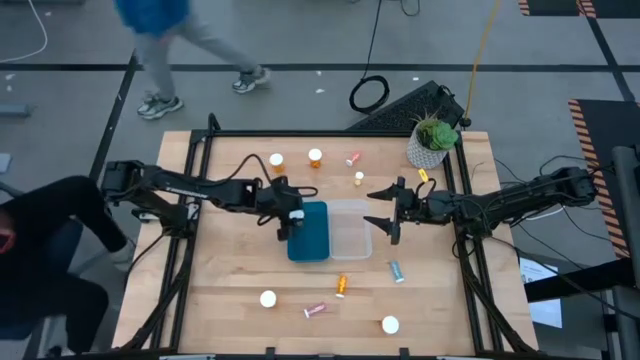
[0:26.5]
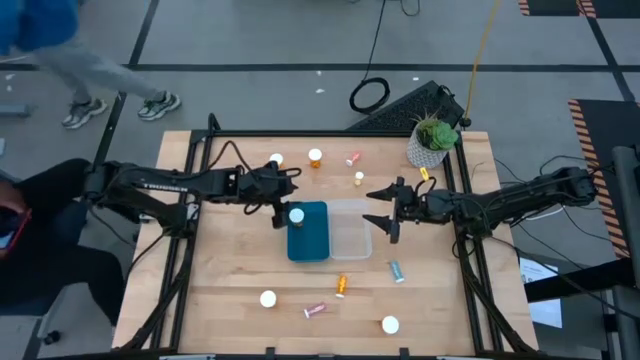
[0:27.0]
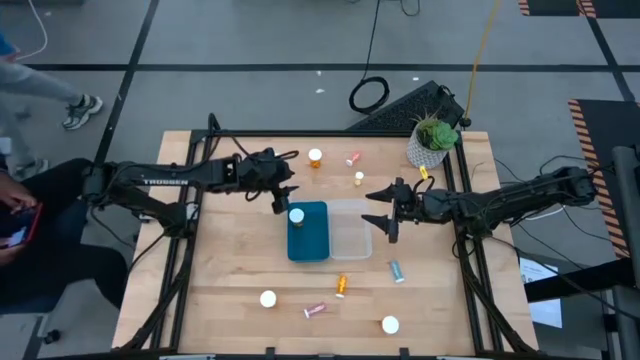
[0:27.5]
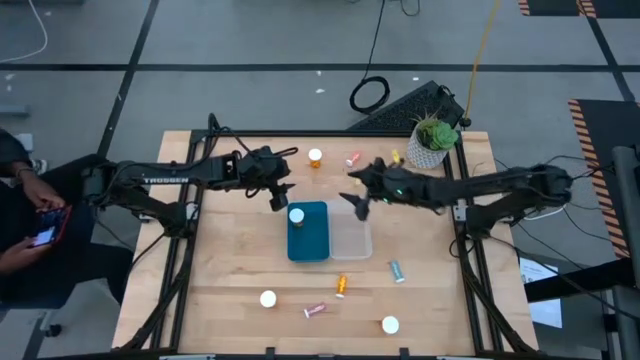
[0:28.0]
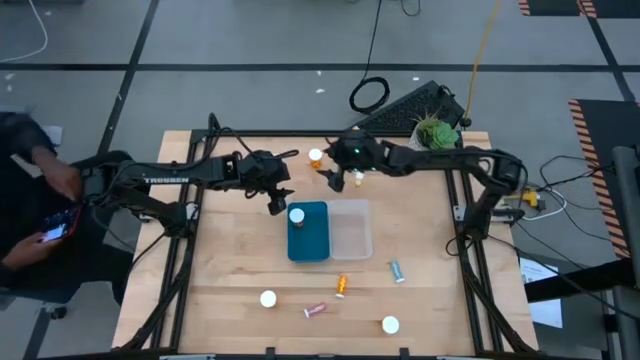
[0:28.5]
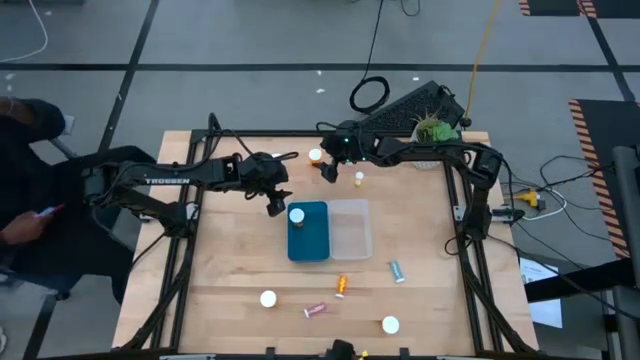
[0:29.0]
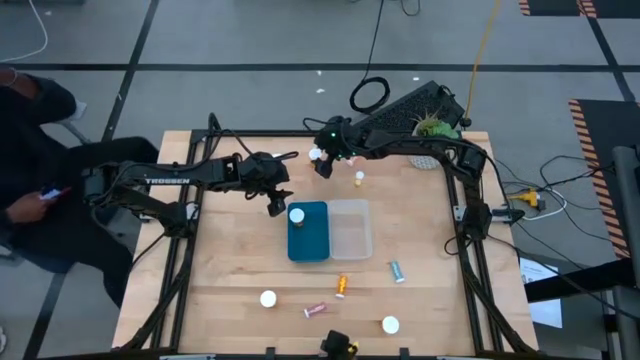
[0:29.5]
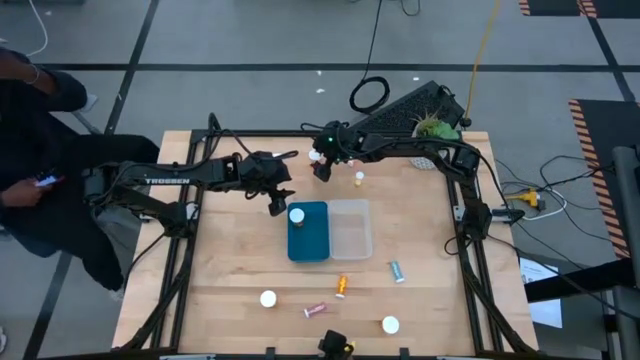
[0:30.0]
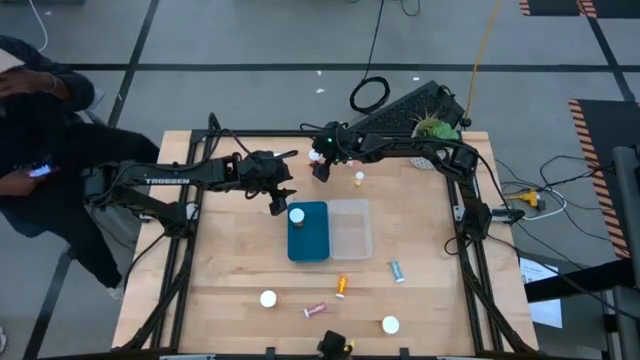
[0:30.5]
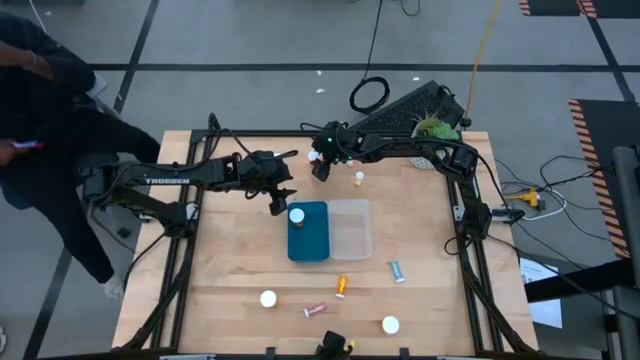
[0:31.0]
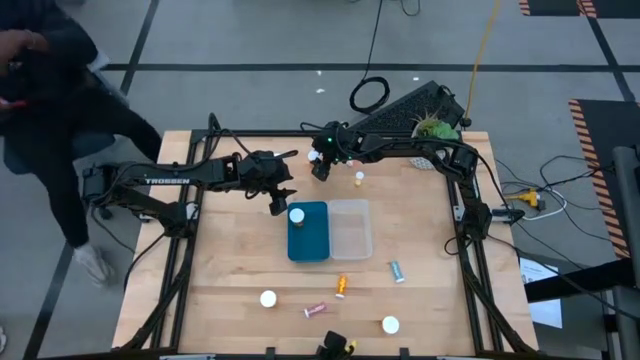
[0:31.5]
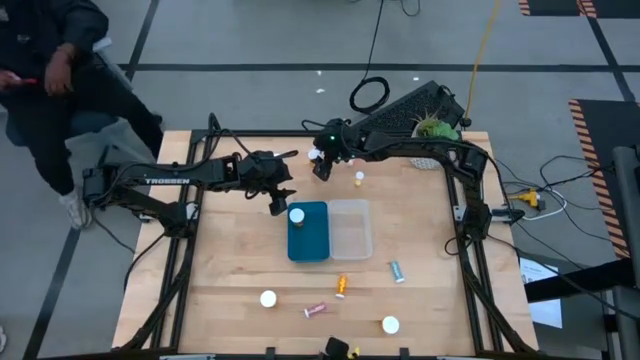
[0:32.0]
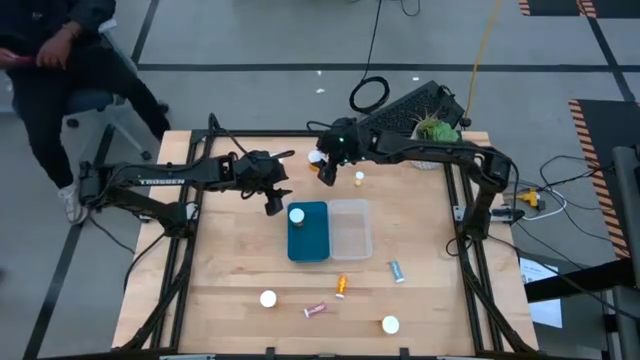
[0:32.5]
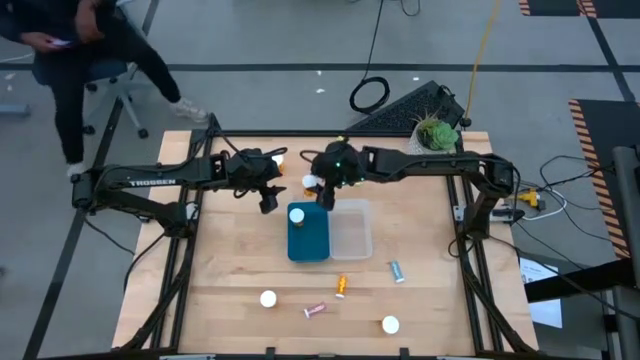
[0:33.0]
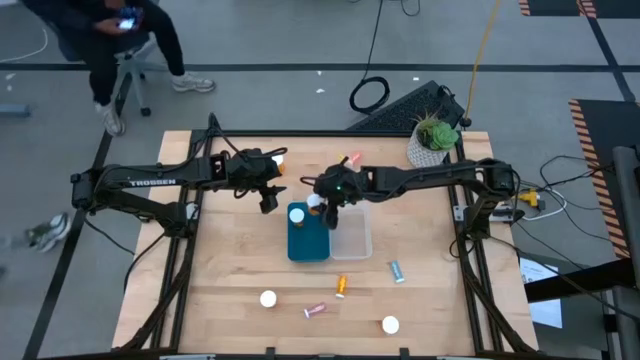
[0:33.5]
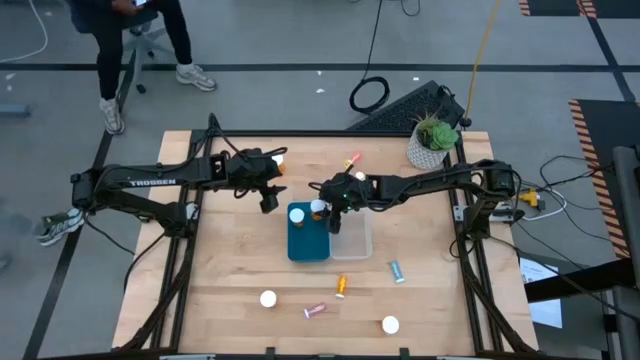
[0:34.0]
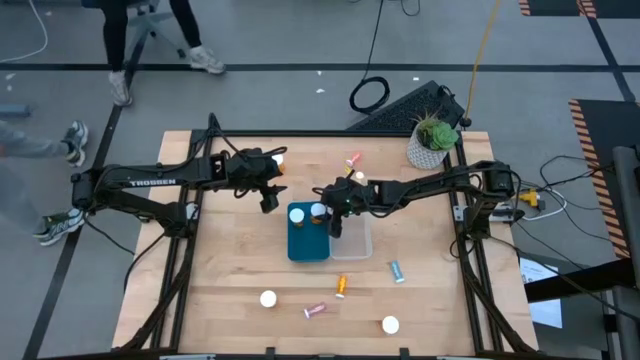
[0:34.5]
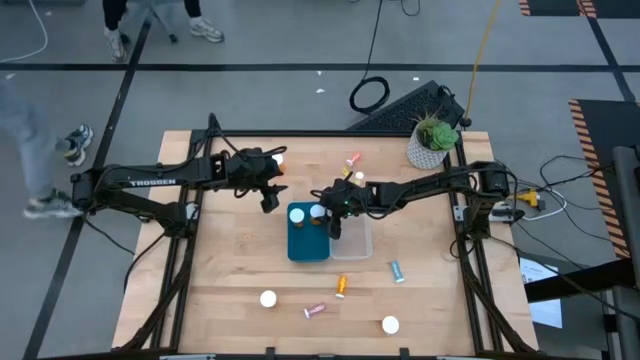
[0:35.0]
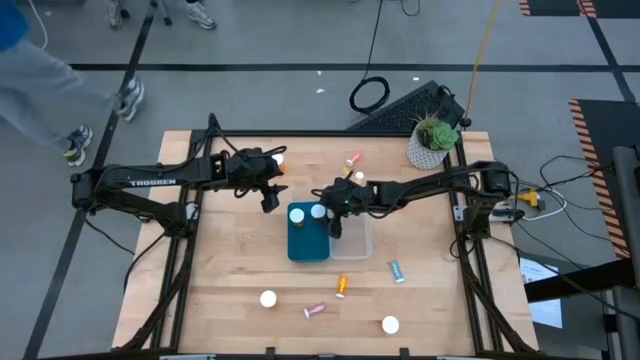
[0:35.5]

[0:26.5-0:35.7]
Task: Pick and place medicine bottles into bin by pill shape (circle, oval)
Put the large orange pill bottle into the blue transparent bin

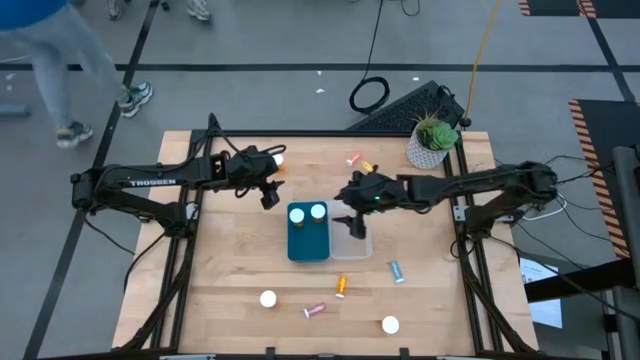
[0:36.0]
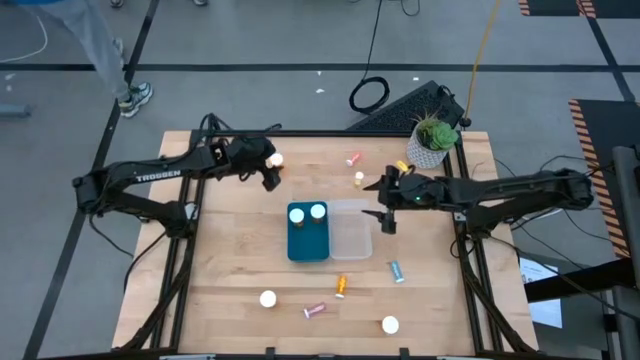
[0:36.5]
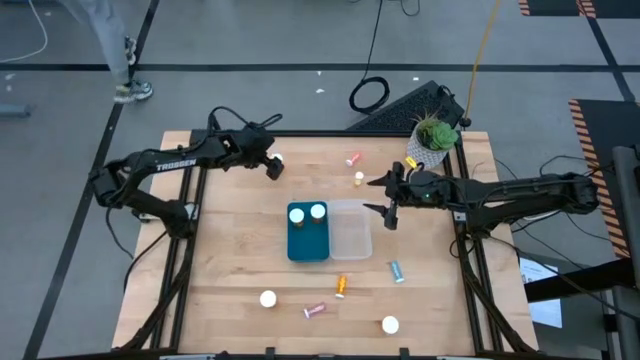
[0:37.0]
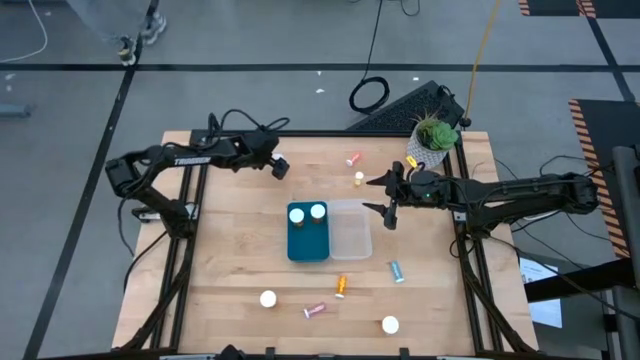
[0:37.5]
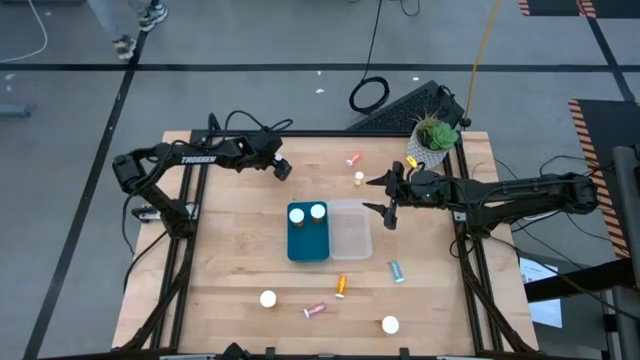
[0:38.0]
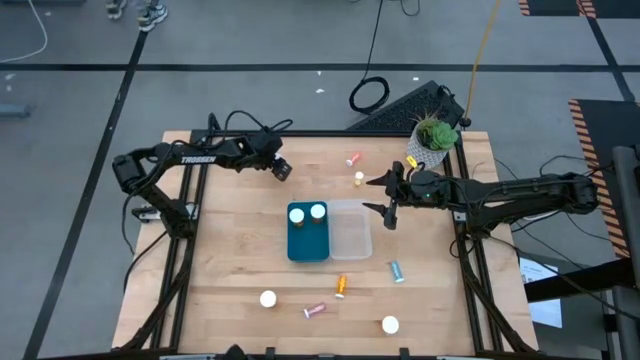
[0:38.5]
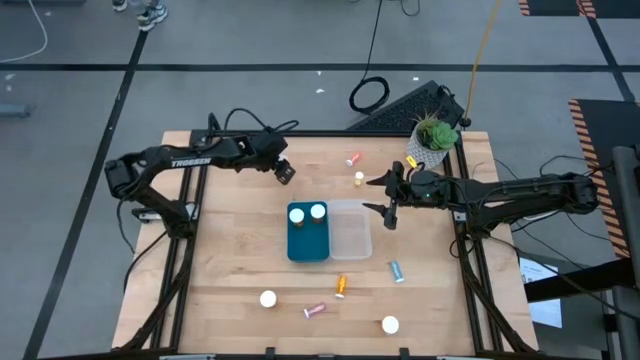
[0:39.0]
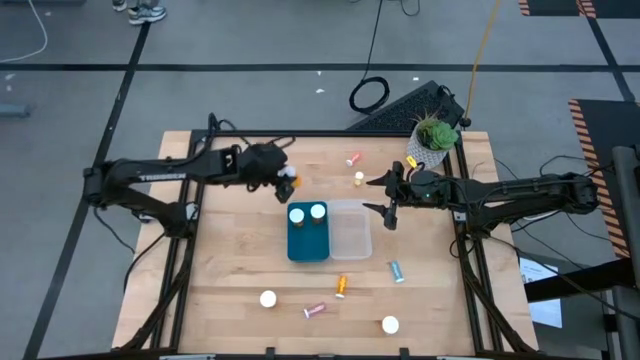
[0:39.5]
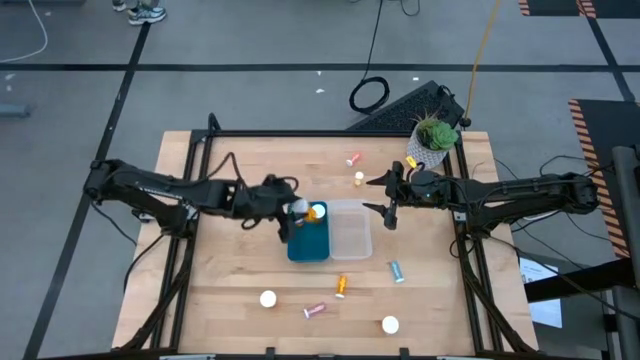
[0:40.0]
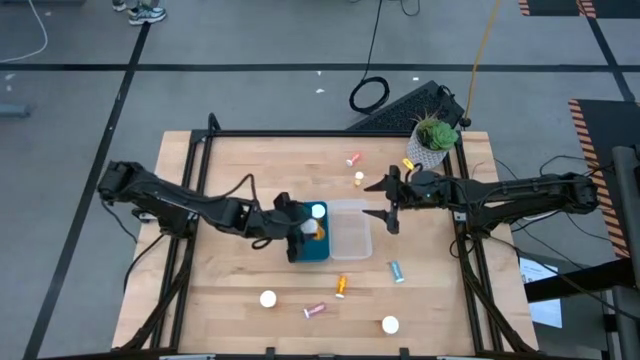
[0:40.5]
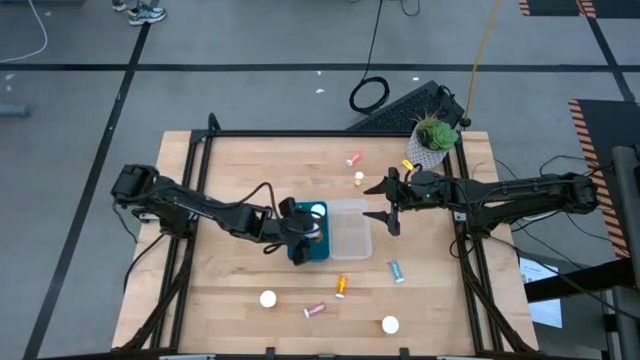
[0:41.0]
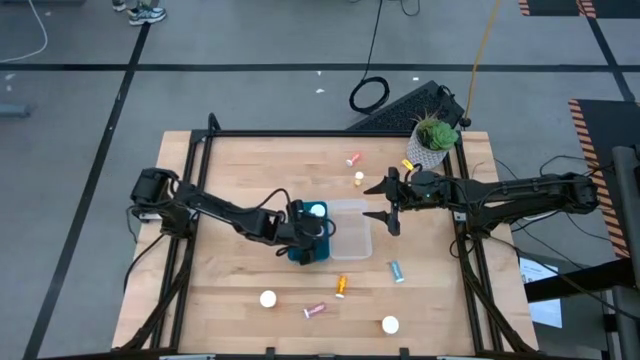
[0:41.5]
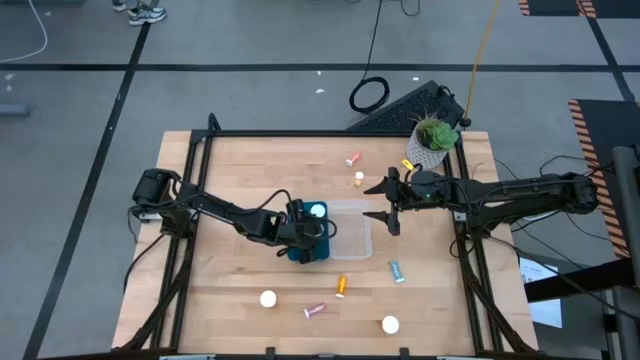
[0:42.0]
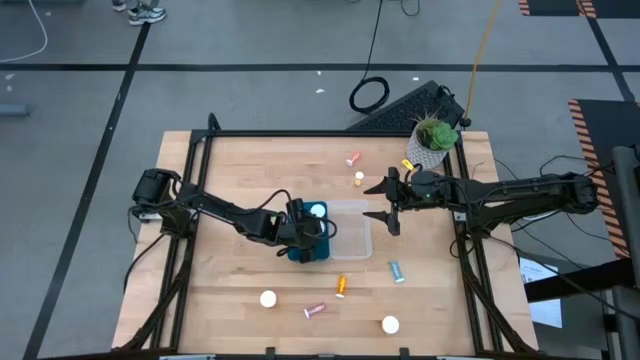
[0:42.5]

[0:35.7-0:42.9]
Put the large orange pill bottle into the blue transparent bin

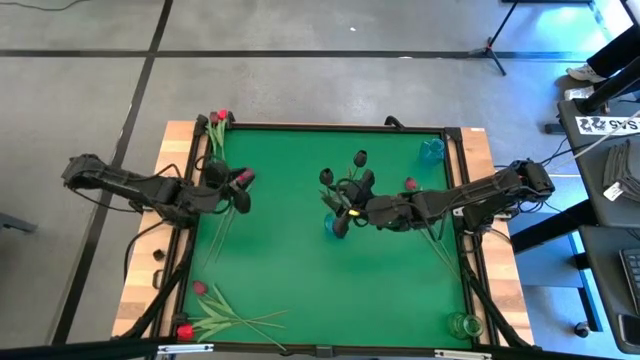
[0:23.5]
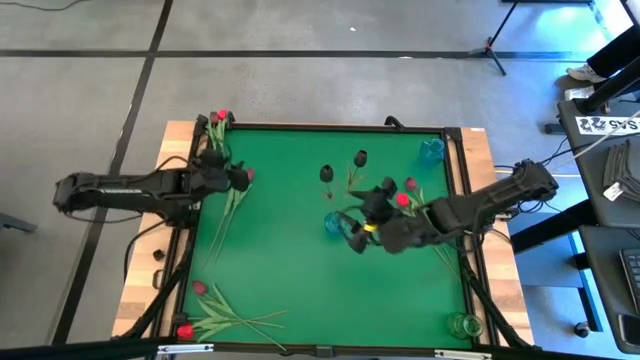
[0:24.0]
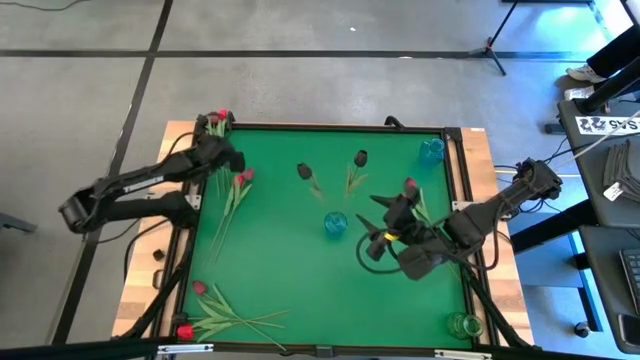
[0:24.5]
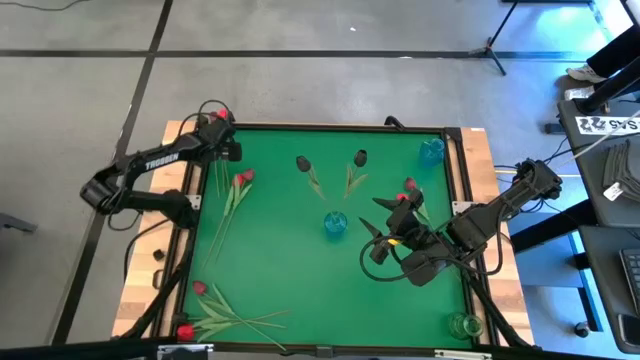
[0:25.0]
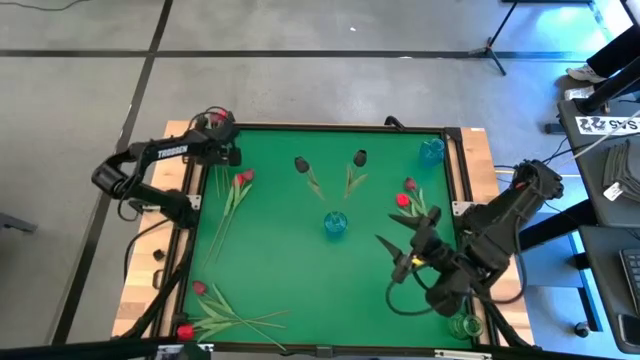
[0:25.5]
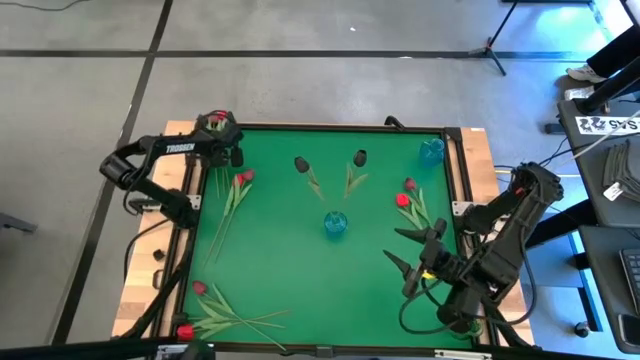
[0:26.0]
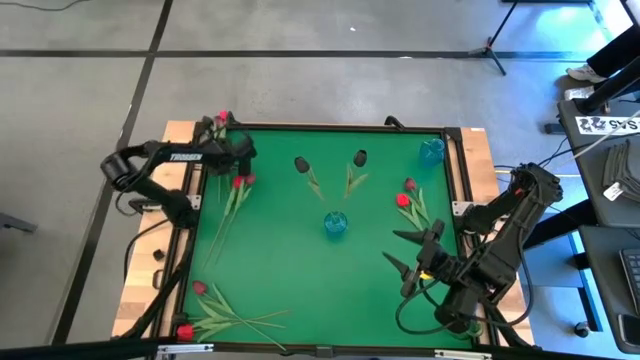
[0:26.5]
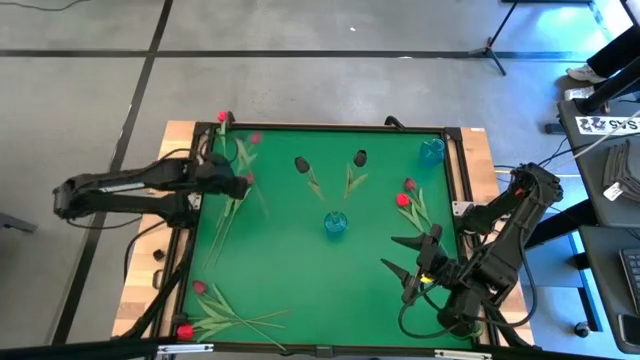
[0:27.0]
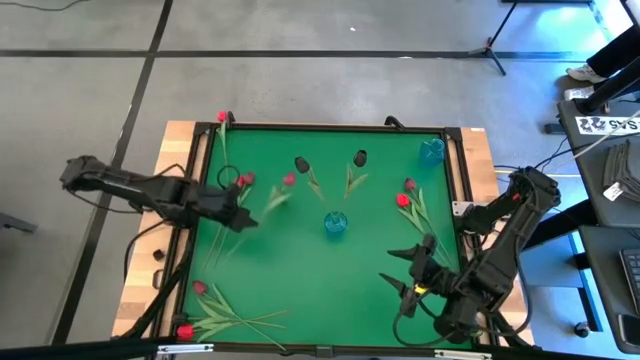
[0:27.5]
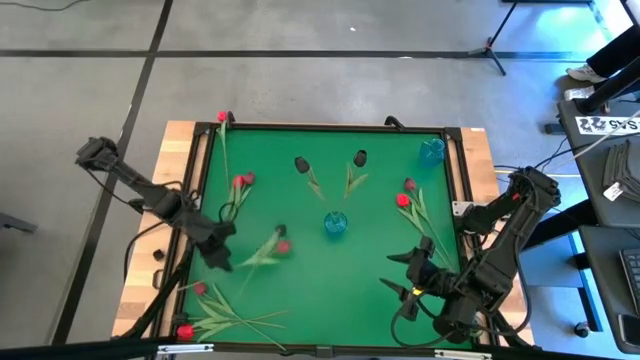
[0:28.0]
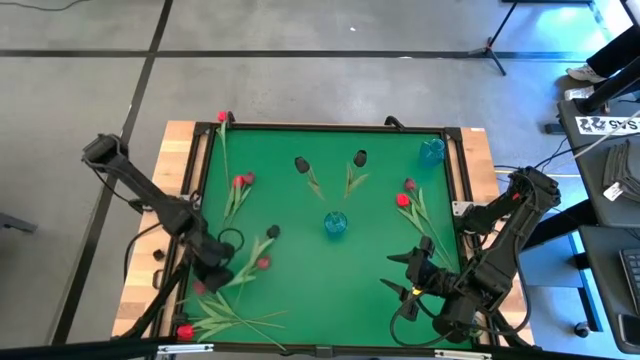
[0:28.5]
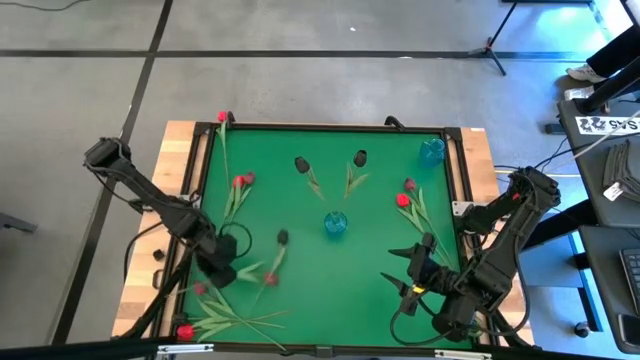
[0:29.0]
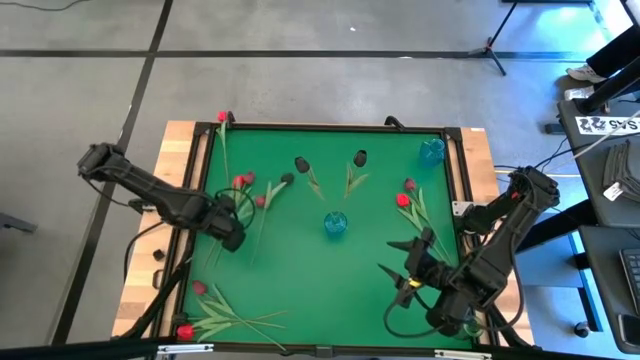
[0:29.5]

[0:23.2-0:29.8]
Task: Sort flowers into vase by color
Move the pink tulip to the middle left of the table
